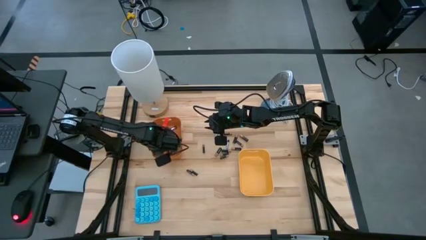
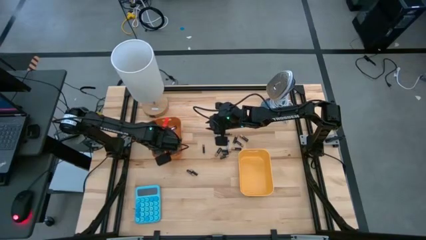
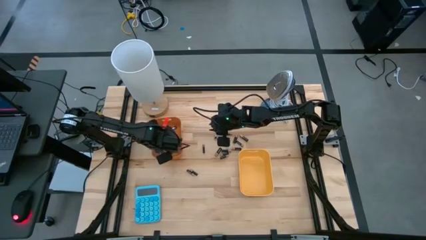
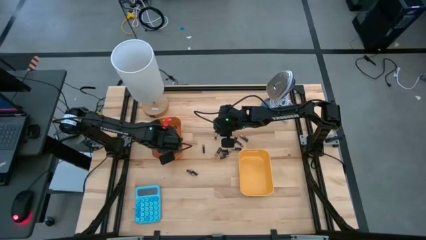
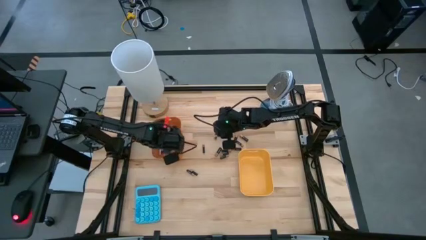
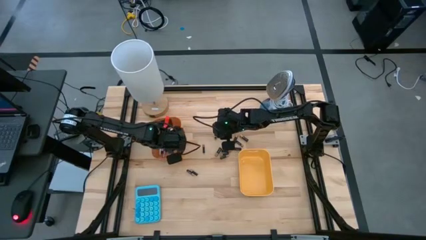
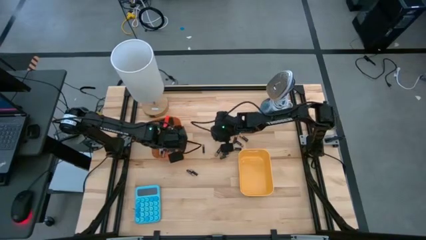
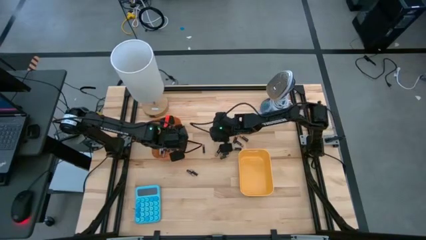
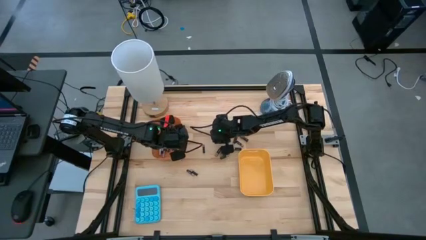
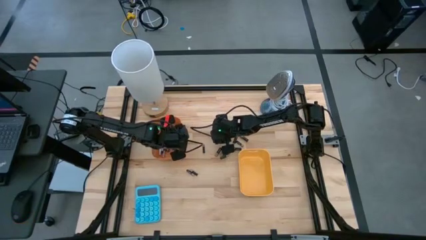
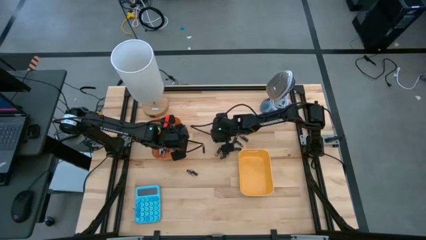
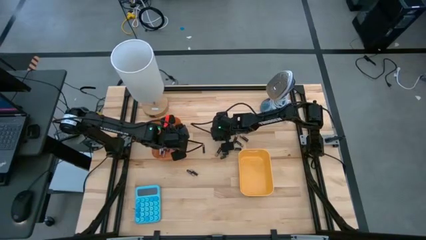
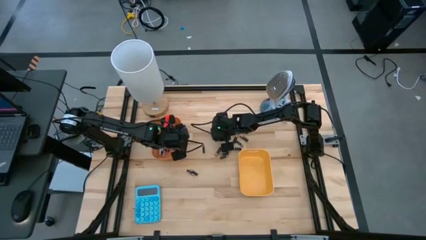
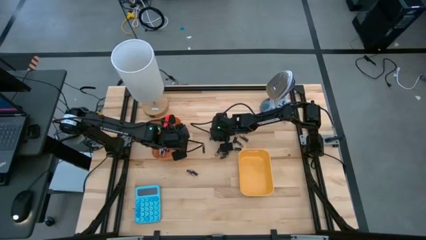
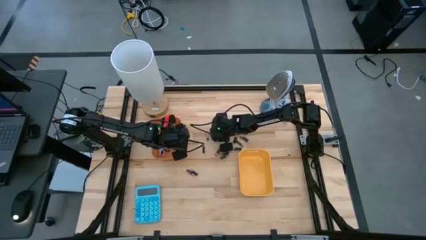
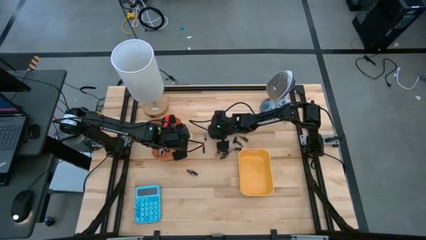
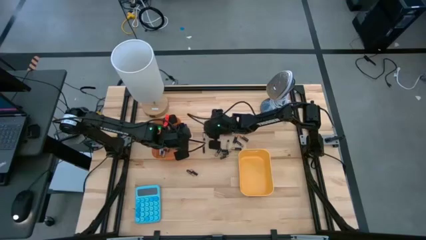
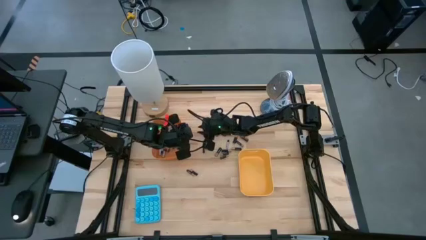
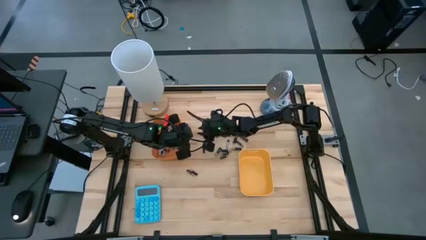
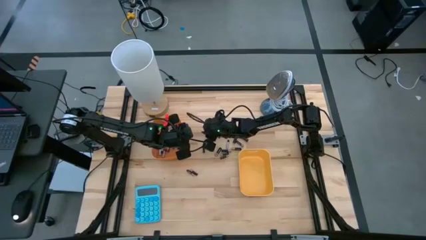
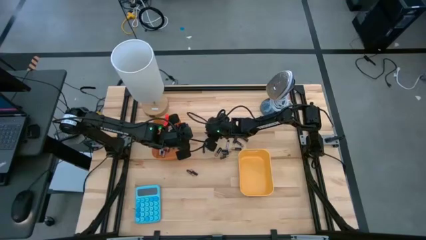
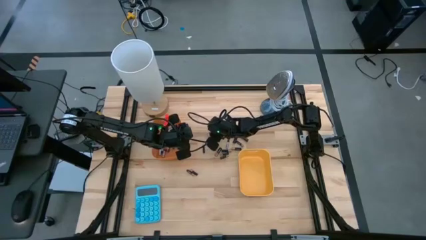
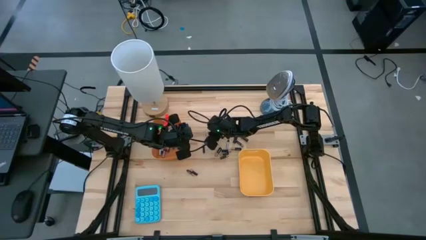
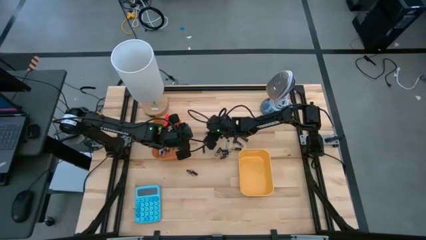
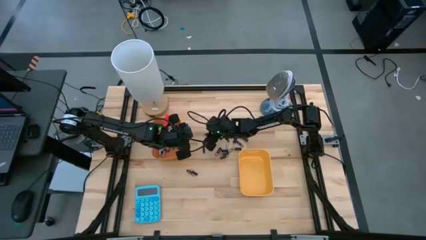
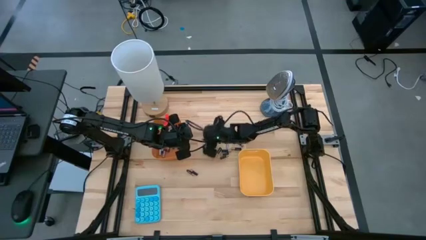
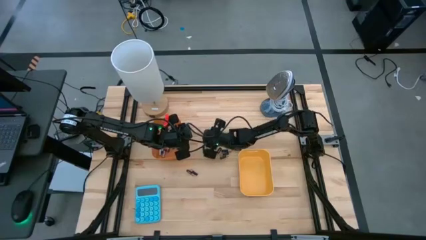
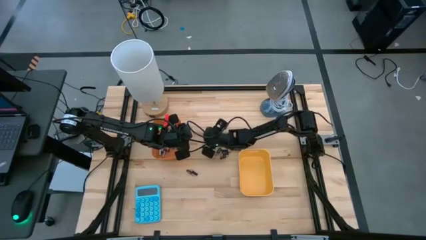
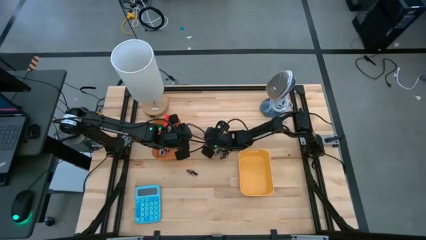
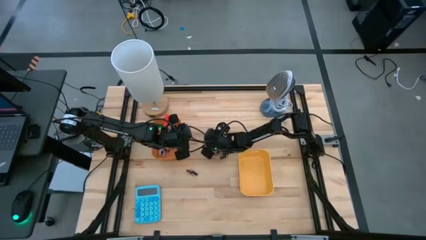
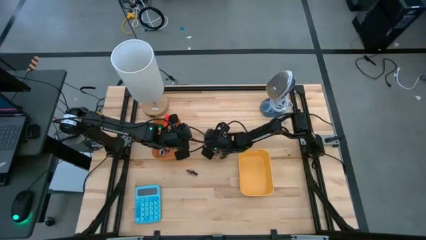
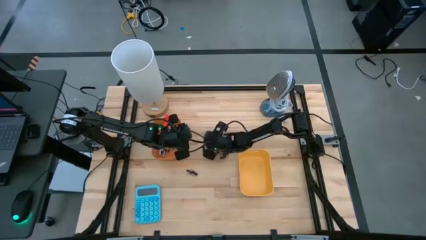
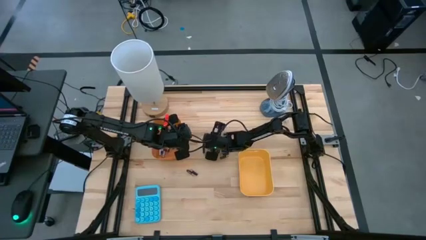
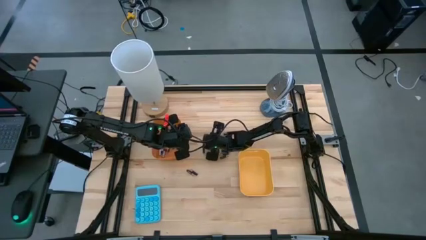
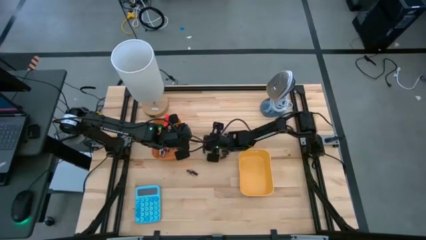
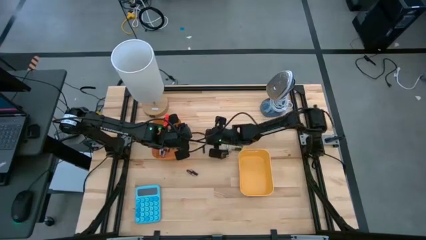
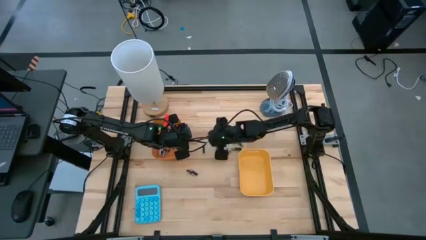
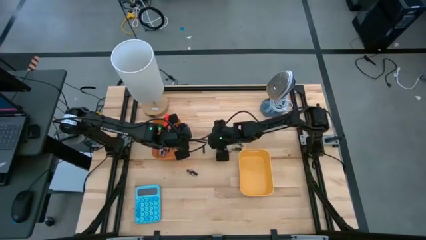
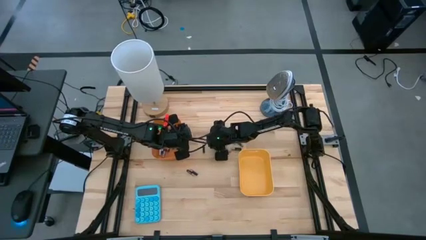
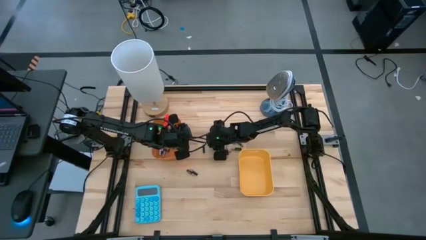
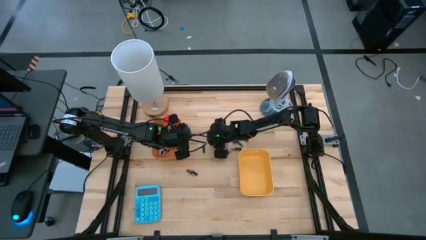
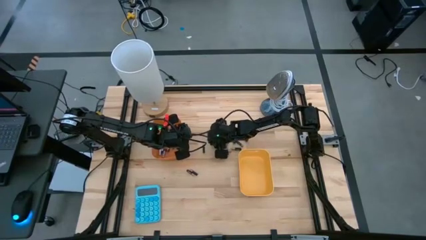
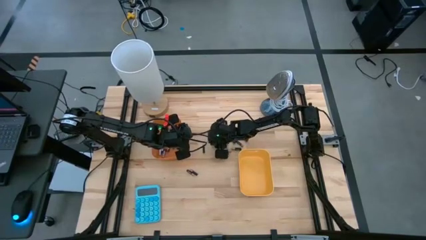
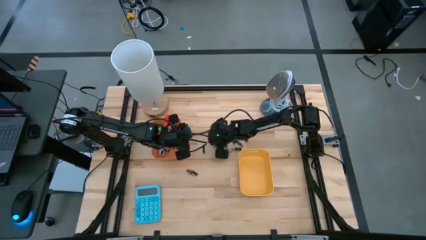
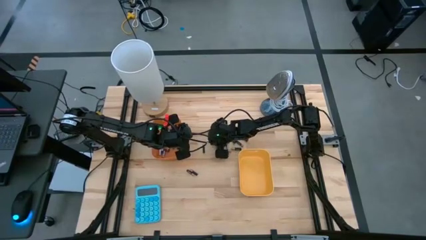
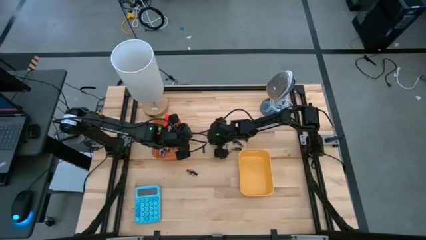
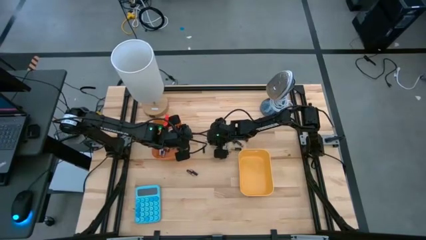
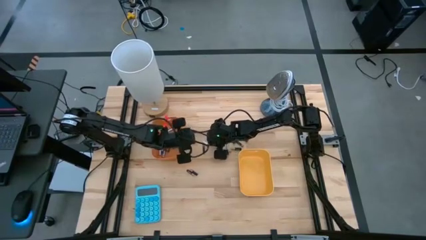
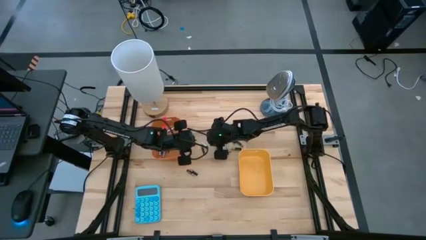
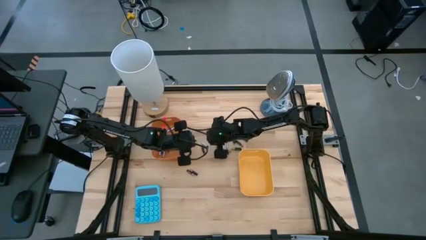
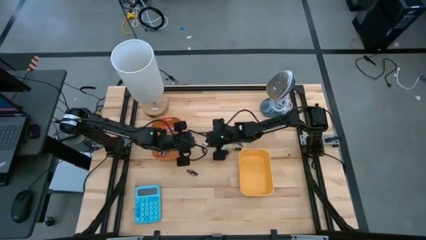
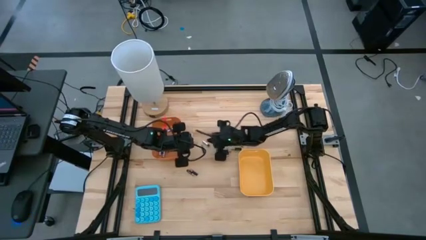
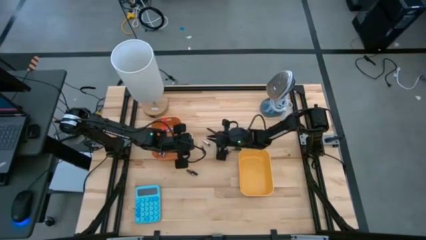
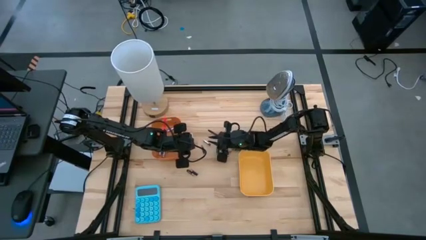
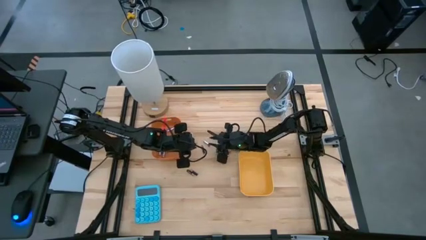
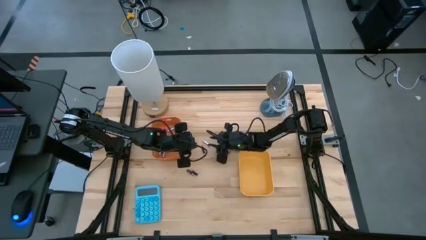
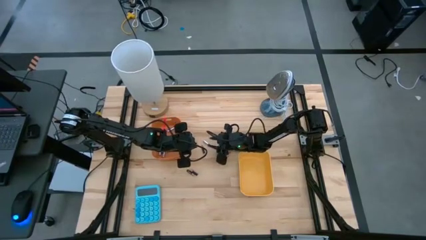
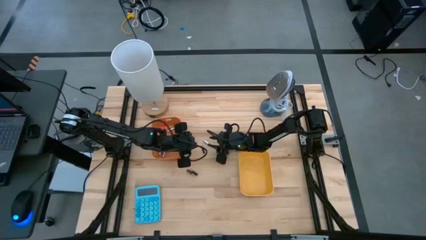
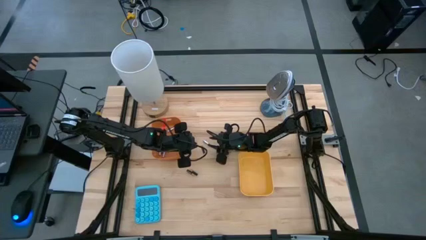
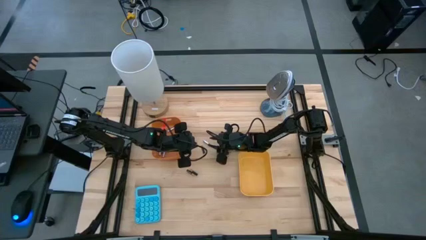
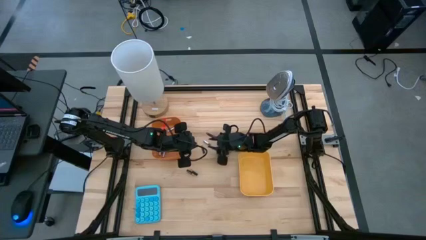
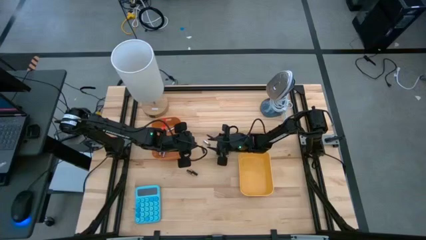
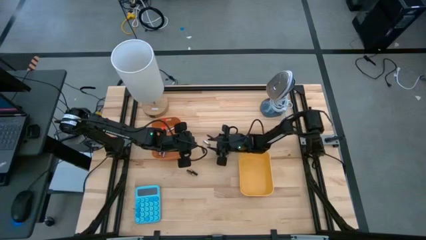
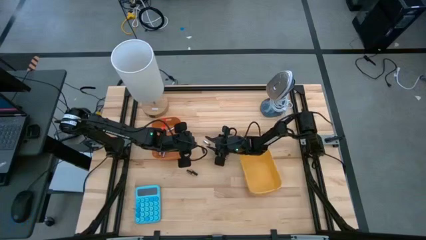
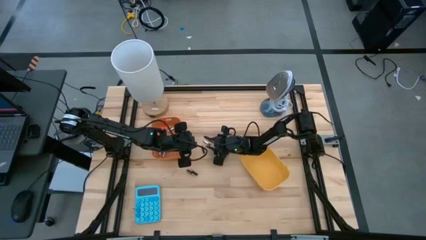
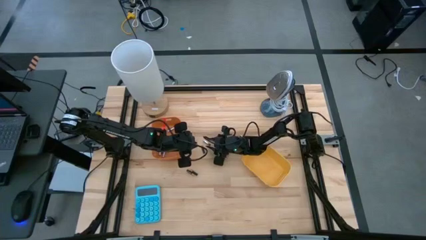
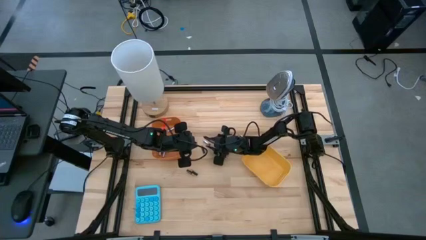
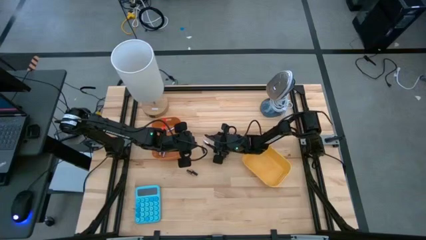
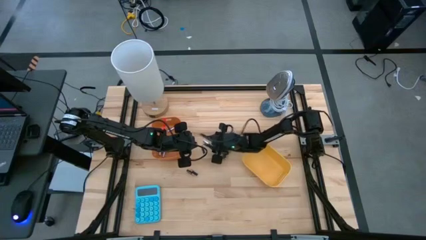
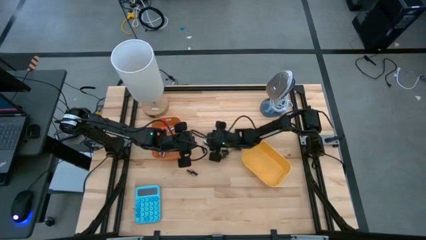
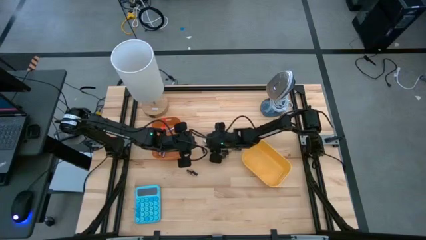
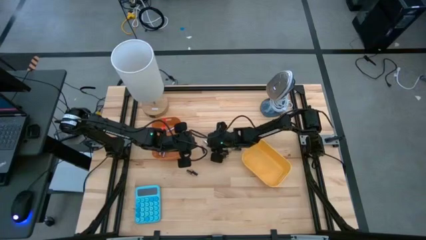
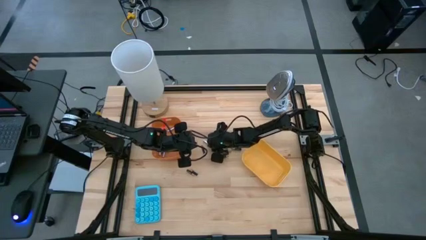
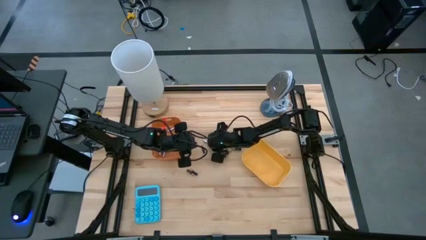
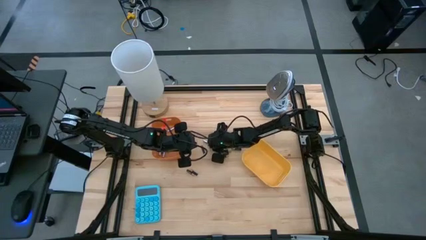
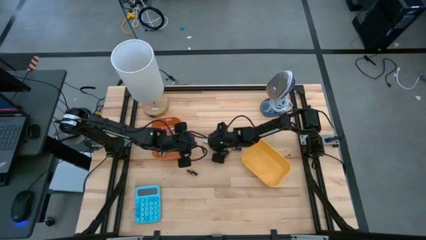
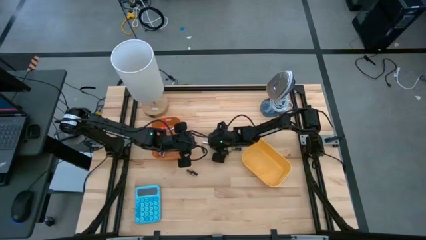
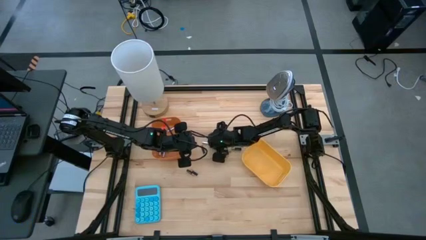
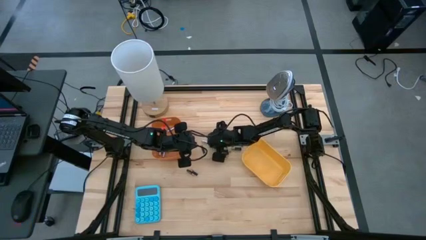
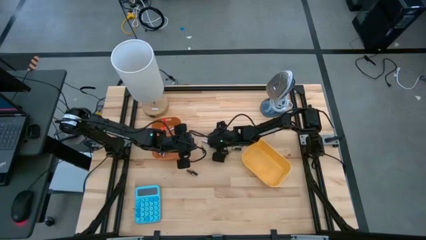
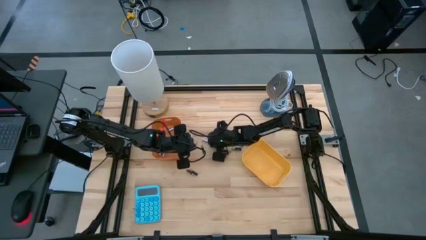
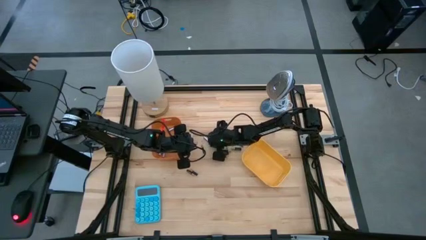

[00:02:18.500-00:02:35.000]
Task: Sort batteries
Put the silver battery into the orange bin

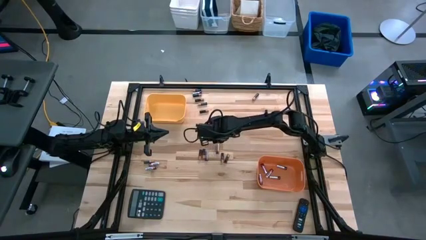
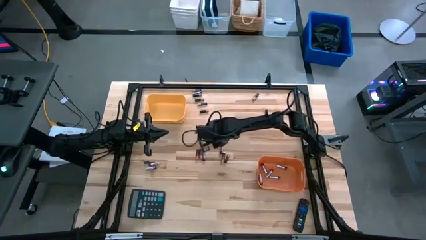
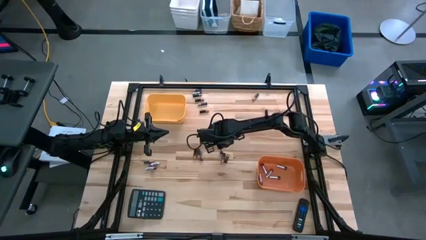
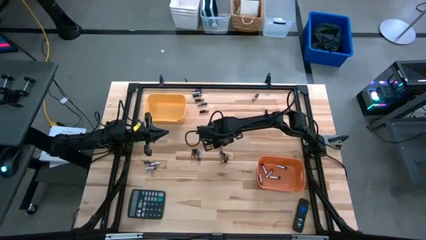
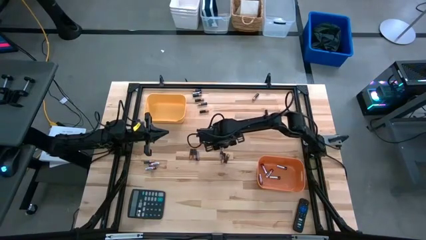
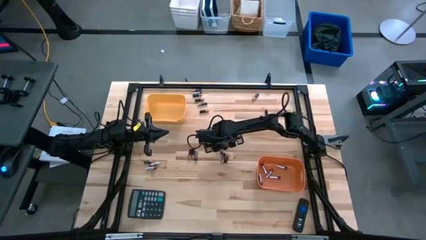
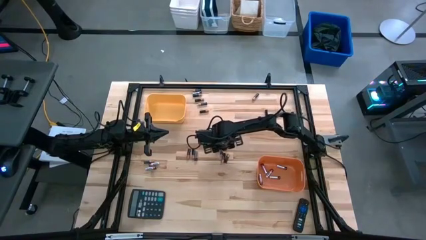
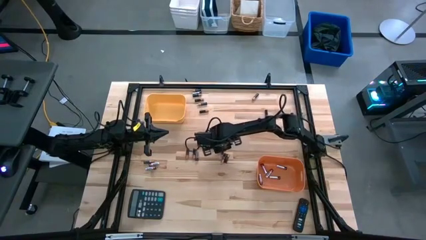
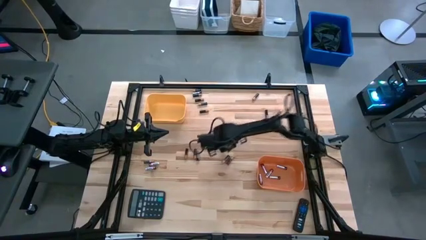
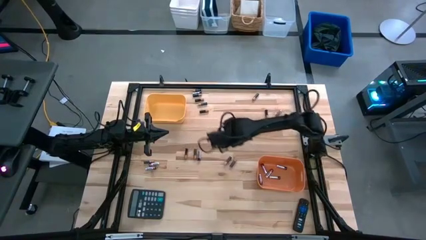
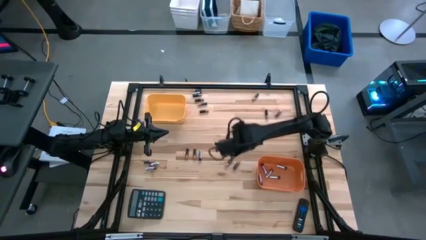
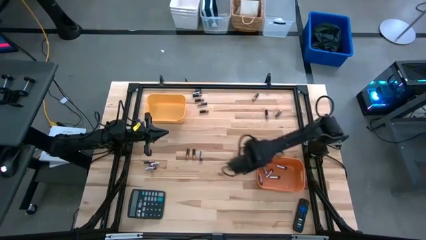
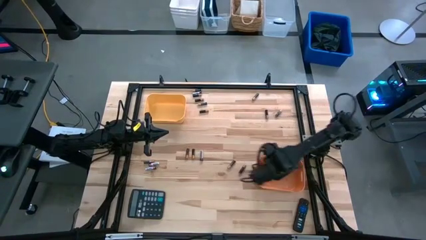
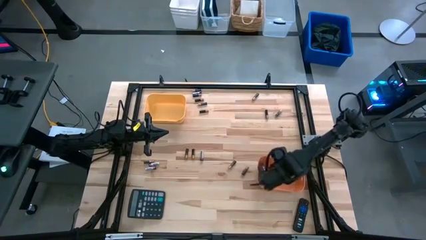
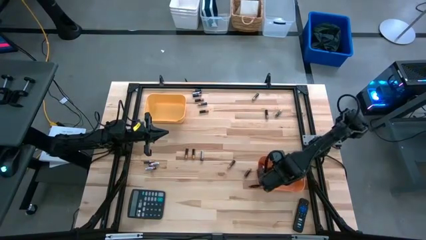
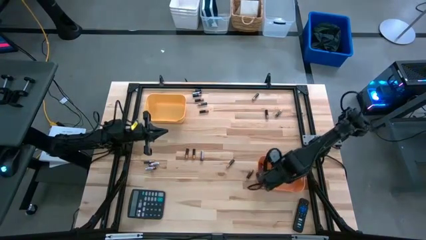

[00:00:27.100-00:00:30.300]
Task: Sort batteries
Put the silver battery into the orange bin
